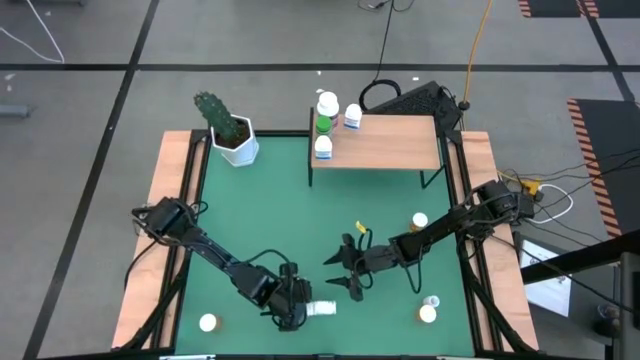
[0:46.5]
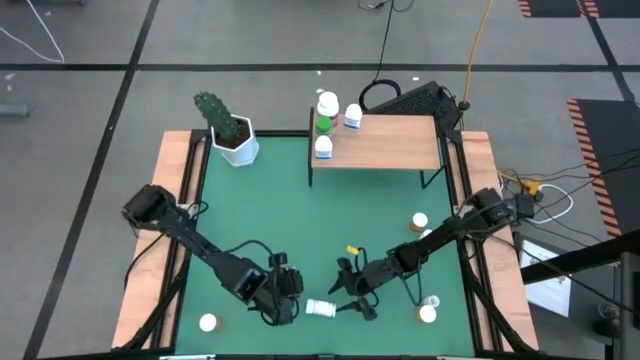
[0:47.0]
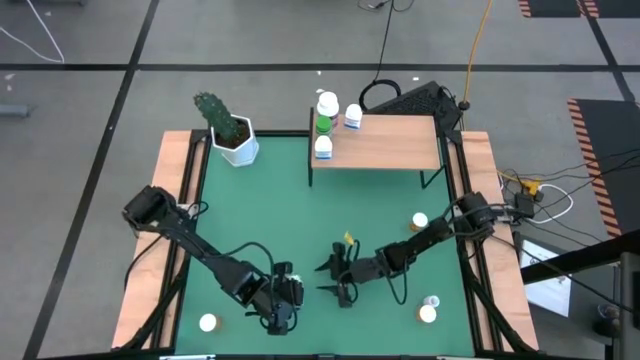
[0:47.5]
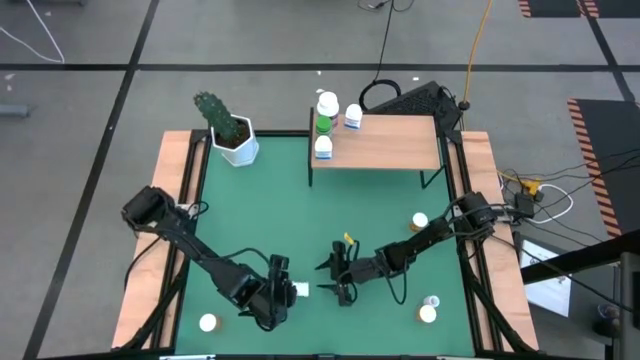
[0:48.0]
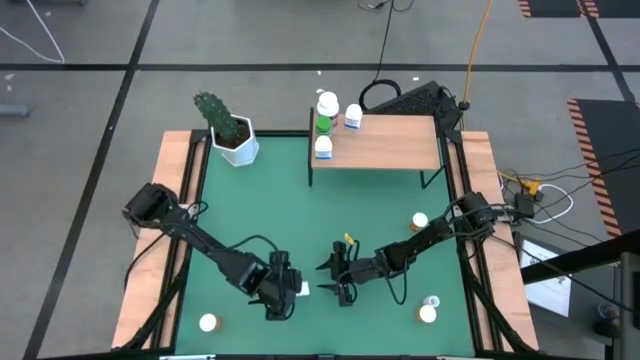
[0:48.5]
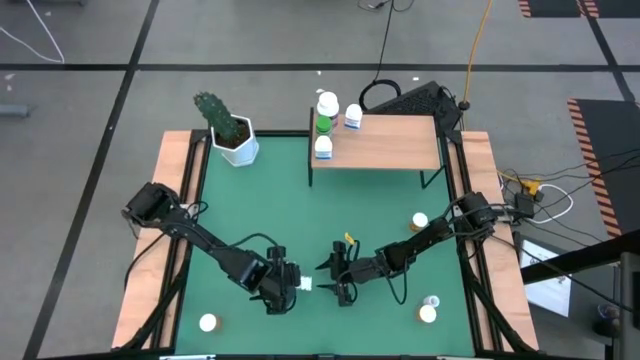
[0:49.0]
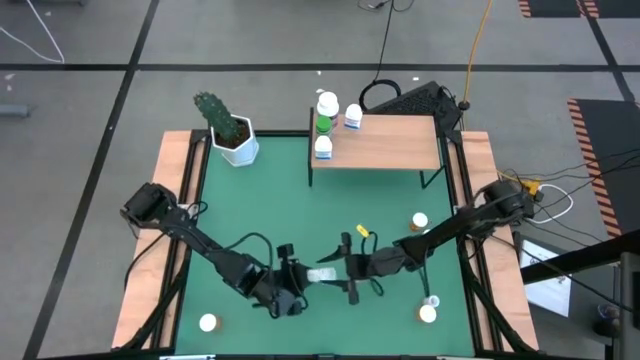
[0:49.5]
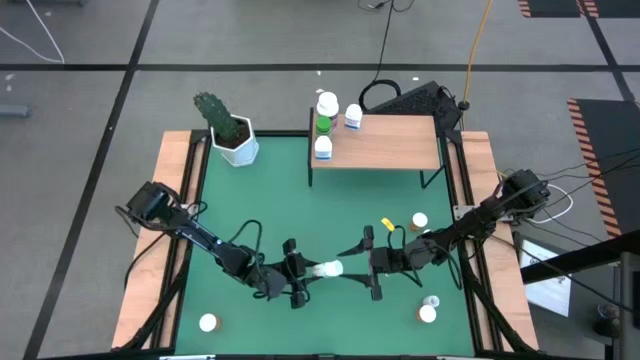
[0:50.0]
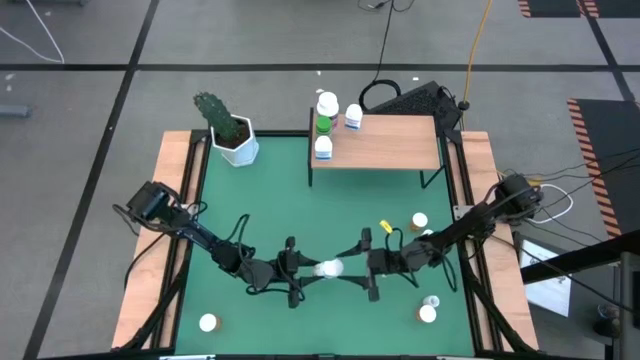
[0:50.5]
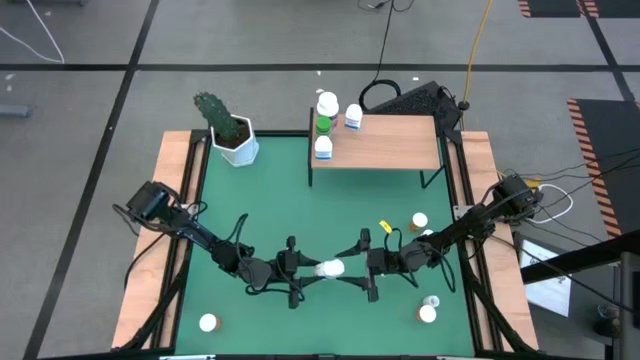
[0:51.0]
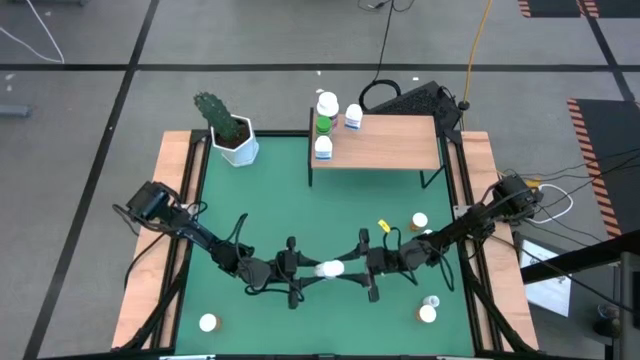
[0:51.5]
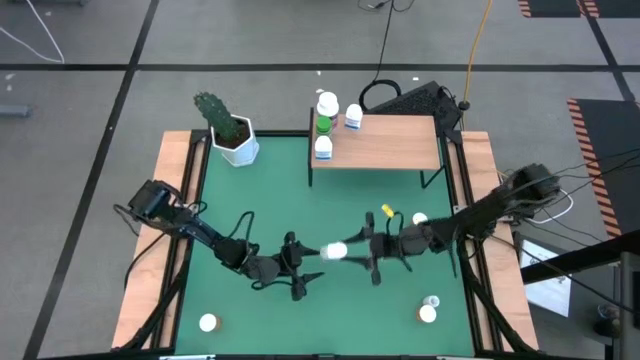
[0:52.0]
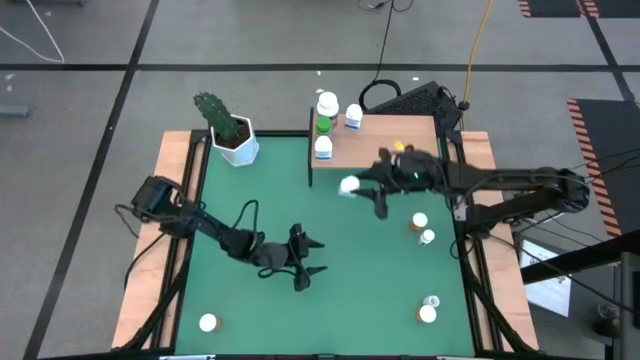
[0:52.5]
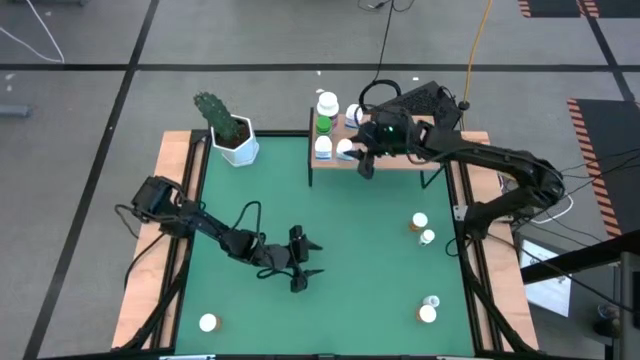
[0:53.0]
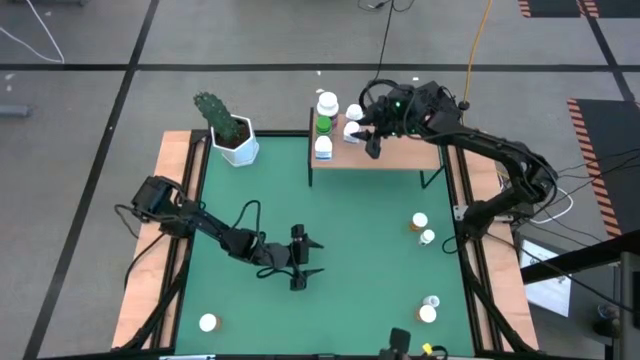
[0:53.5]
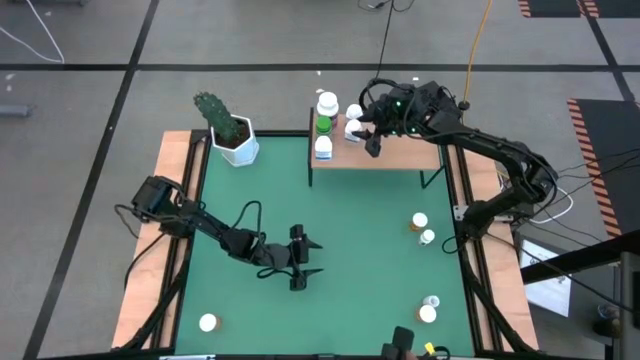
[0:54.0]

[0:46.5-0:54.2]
Task: Pick and place medicine bottles onto shelf by color
Put the blue pill bottle on the shelf

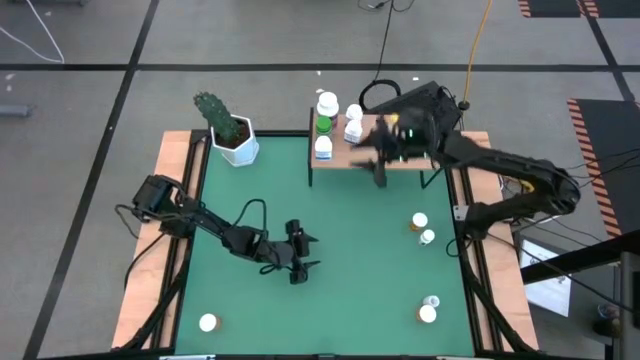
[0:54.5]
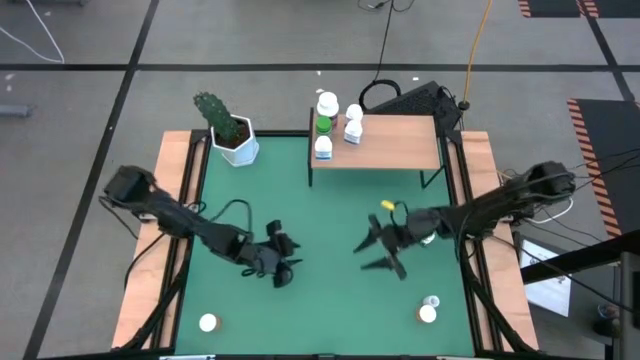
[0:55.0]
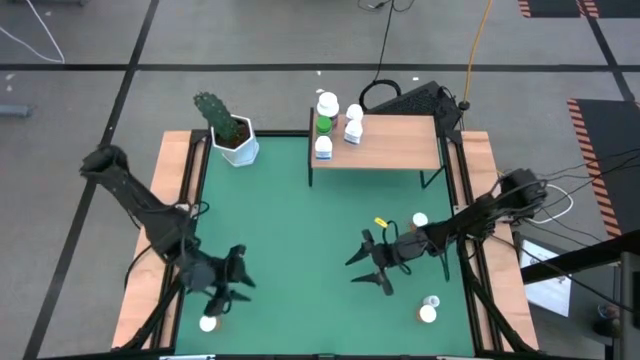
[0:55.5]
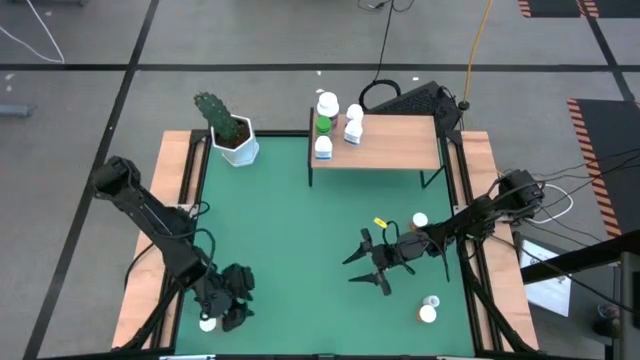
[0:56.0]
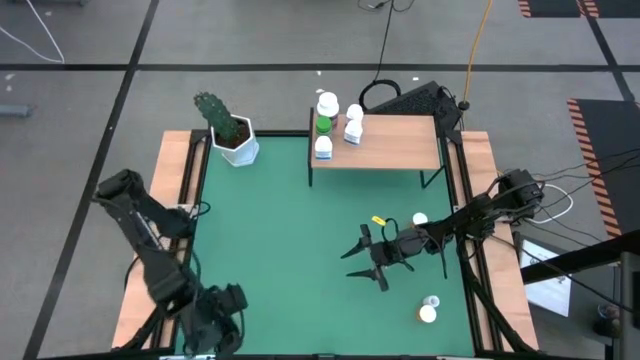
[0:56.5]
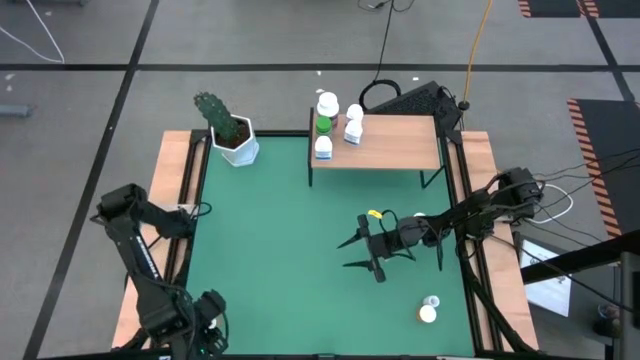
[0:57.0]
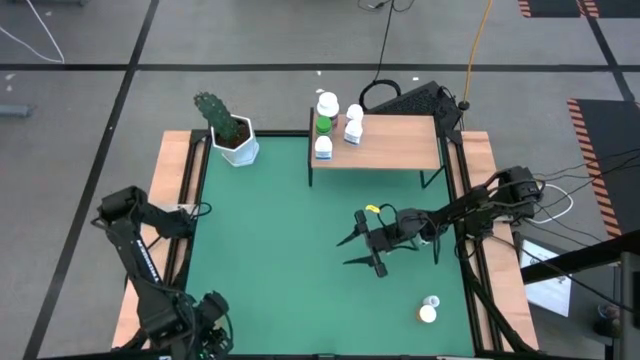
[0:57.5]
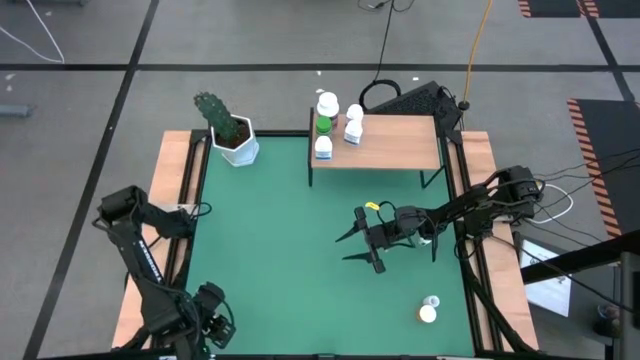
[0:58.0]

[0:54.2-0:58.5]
Put the orange pill bottle on the shelf

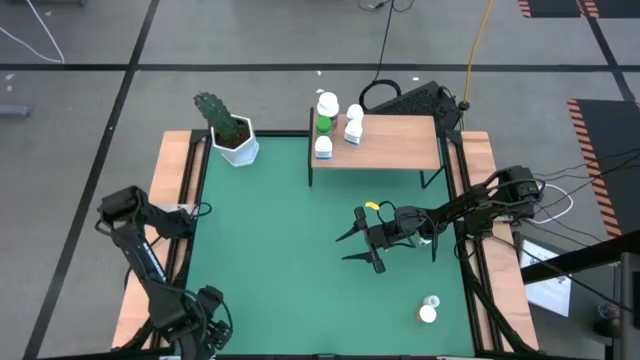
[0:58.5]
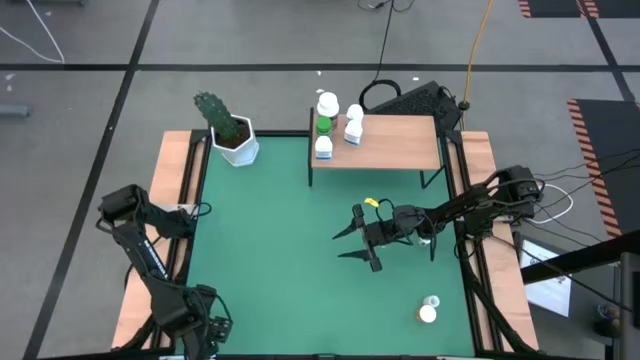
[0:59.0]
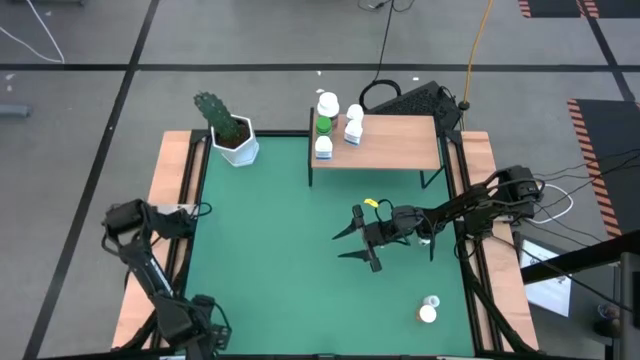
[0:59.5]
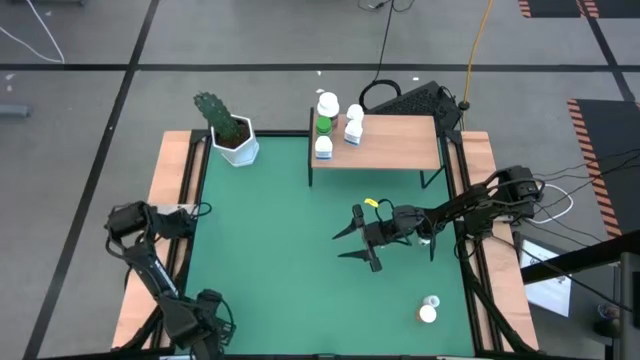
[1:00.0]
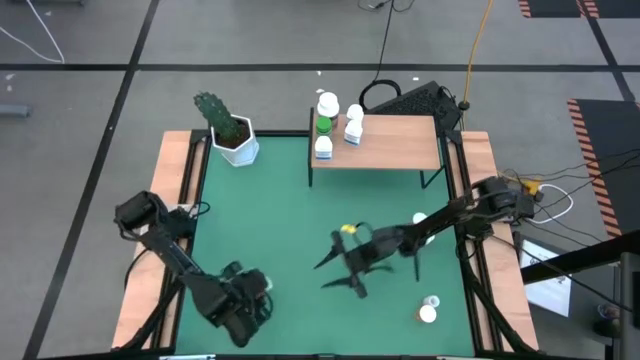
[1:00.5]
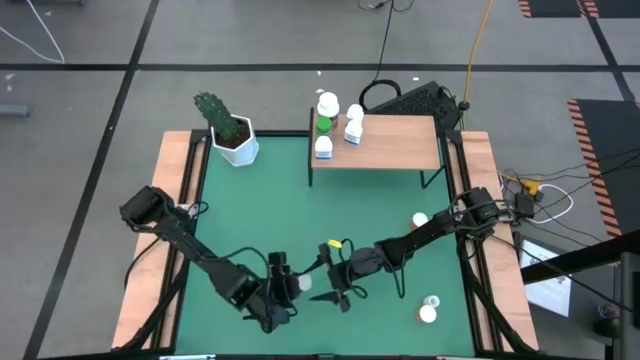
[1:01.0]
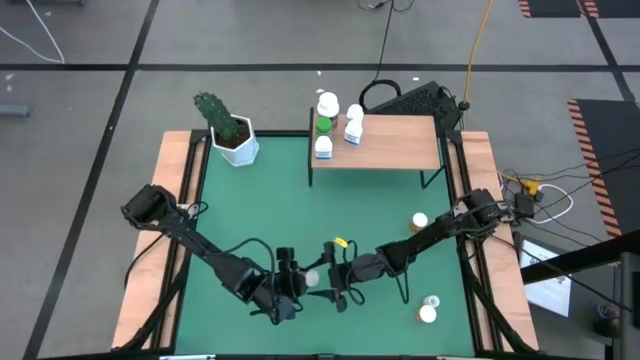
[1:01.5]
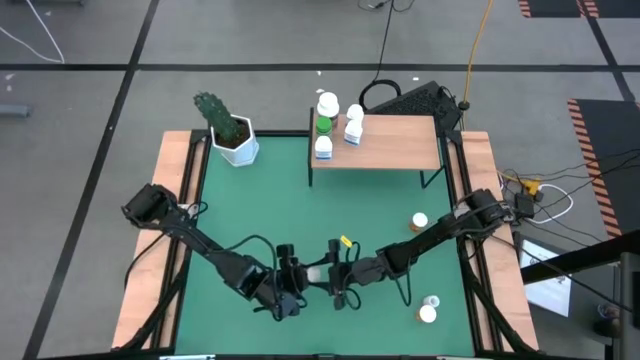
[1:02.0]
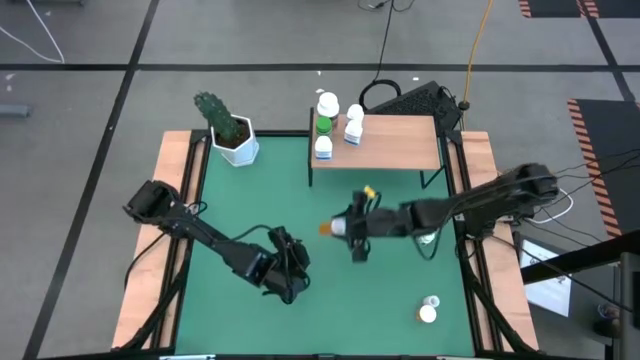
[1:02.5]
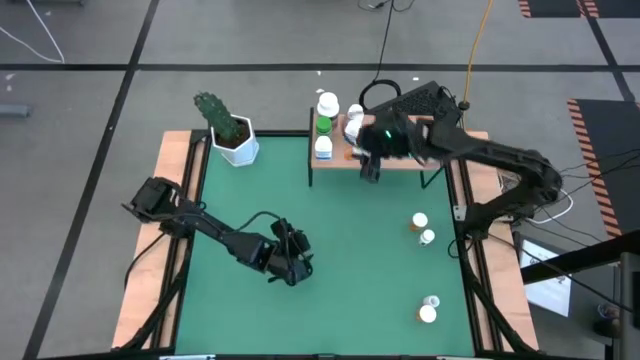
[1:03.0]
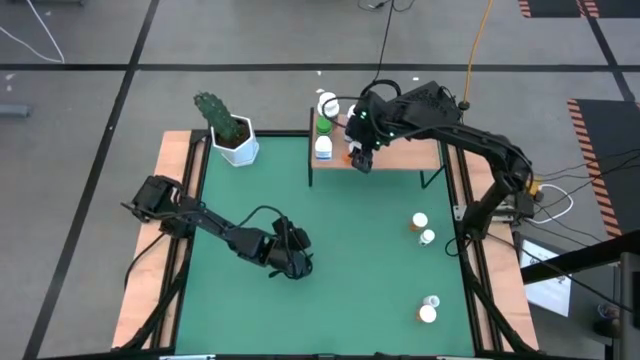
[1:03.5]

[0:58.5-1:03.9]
Put the bottom left orange pill bottle on the shelf

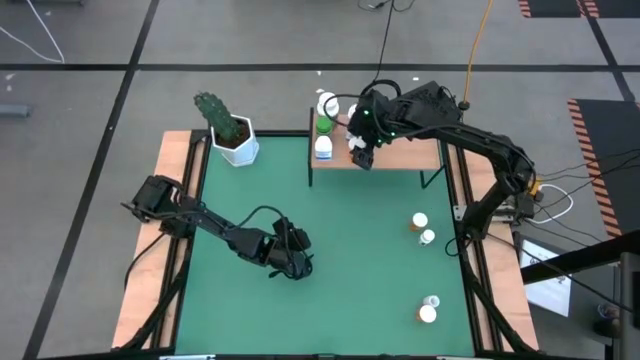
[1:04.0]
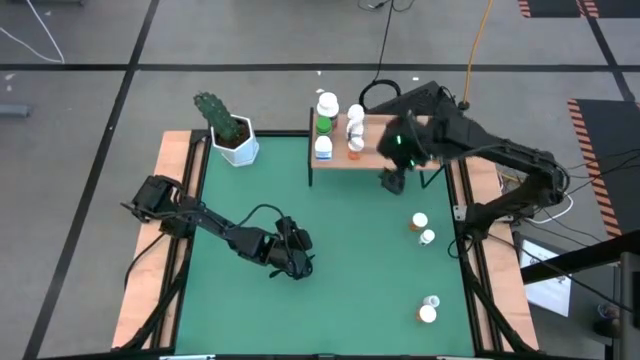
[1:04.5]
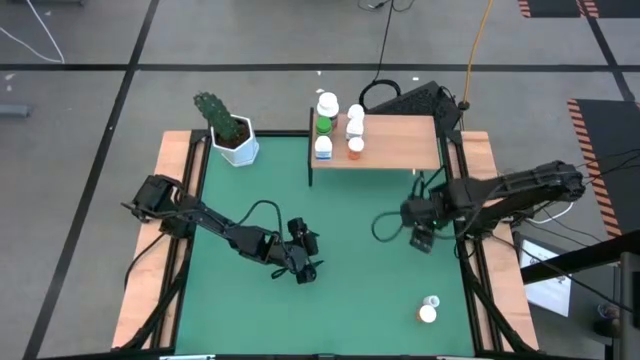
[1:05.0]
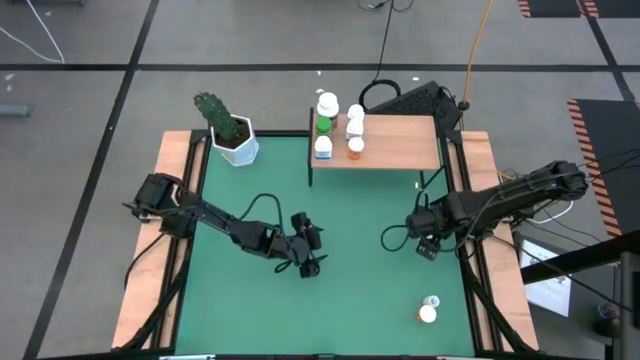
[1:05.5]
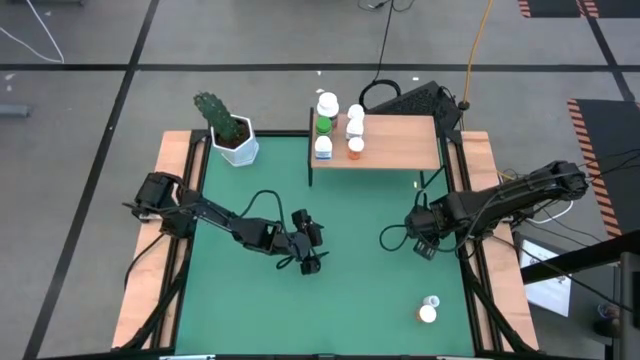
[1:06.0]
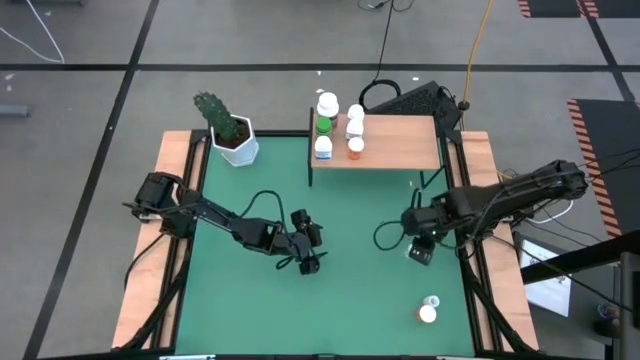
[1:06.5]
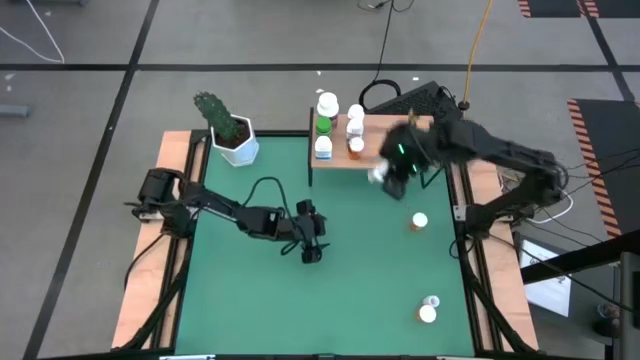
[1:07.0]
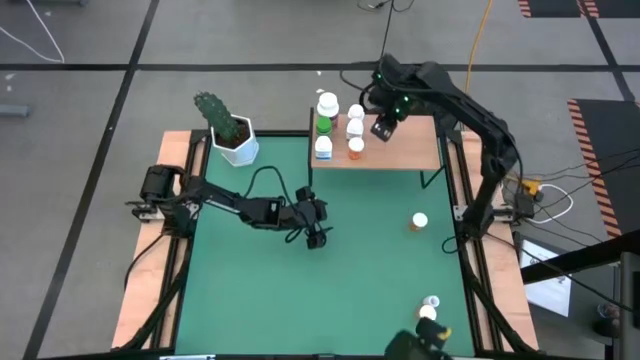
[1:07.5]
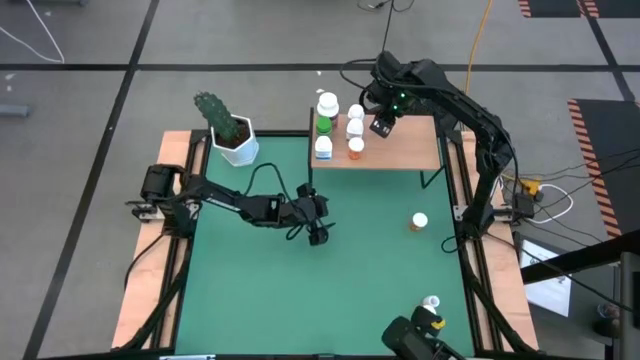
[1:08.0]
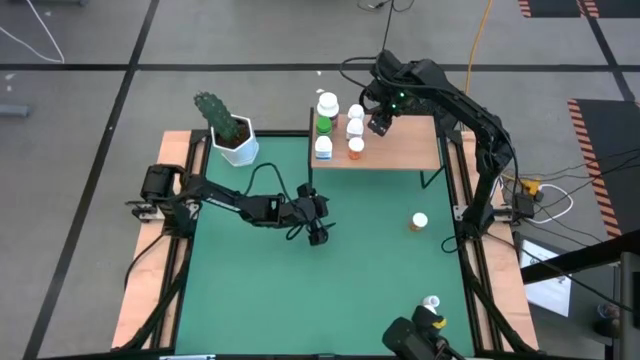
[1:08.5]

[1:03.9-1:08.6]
Put the white small pill bottle on the shelf
